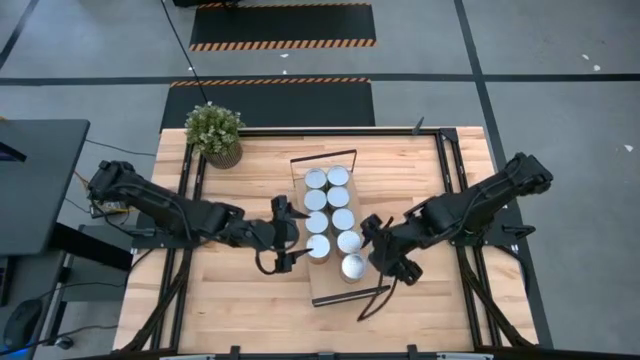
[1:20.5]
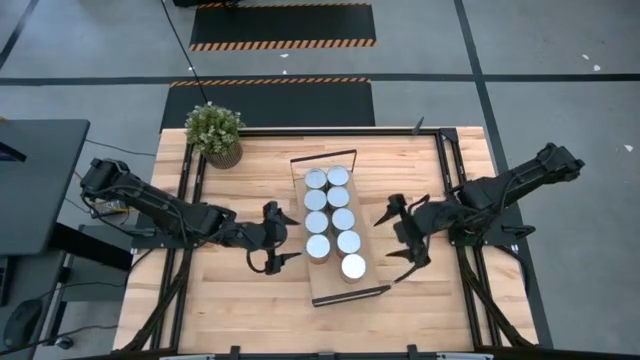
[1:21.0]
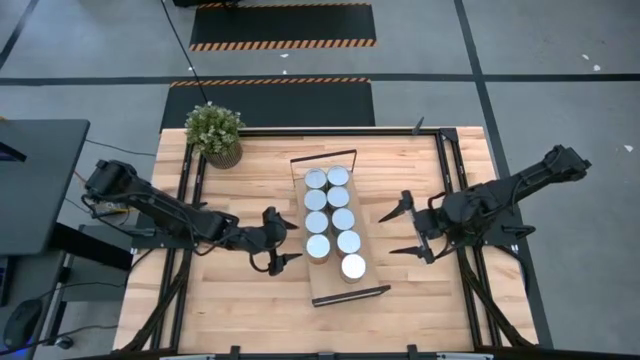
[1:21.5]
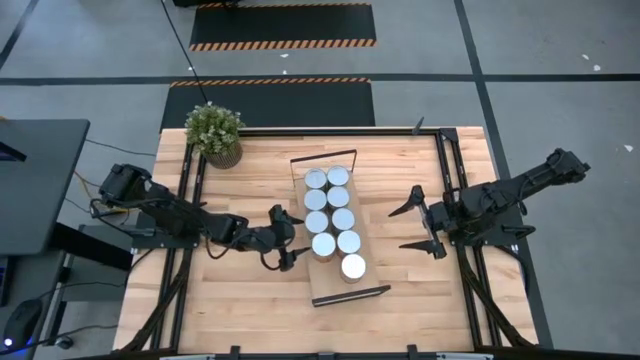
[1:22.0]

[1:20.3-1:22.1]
Task: Pick and place cans onto a shelf
Adjust left canned pineapples on the shelf

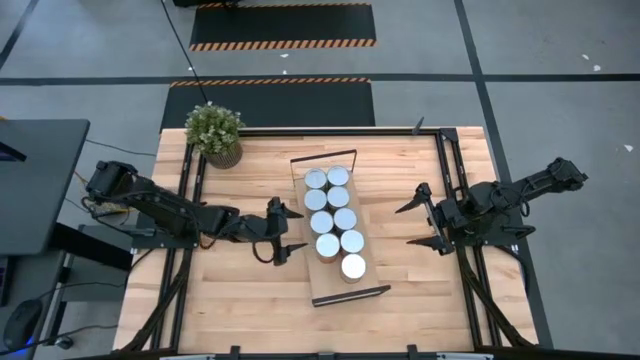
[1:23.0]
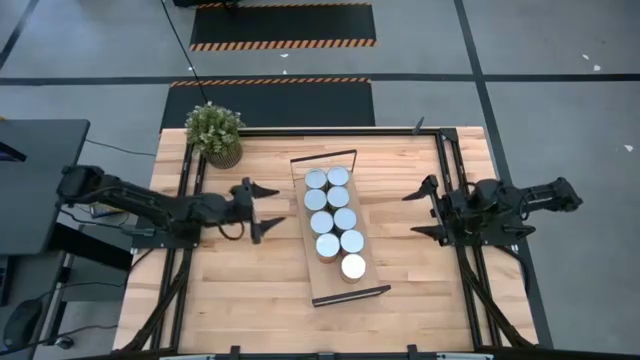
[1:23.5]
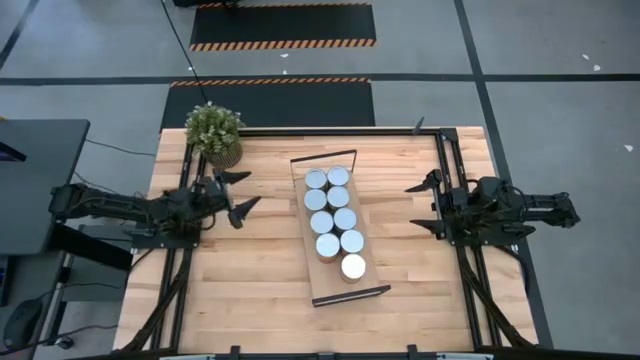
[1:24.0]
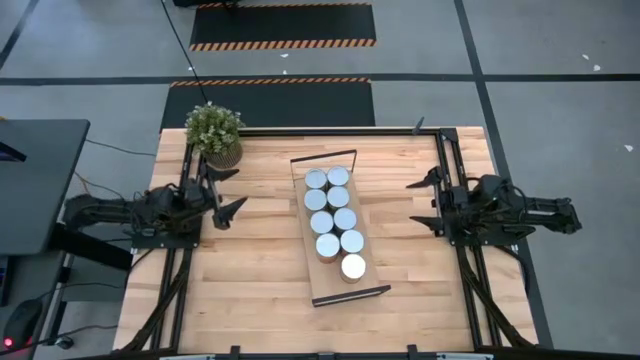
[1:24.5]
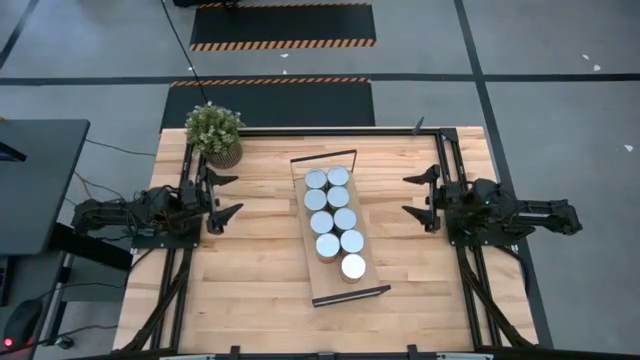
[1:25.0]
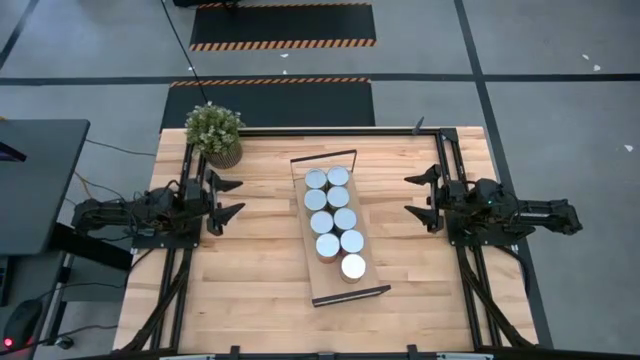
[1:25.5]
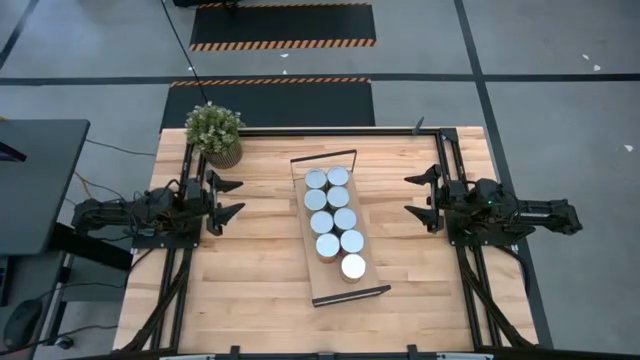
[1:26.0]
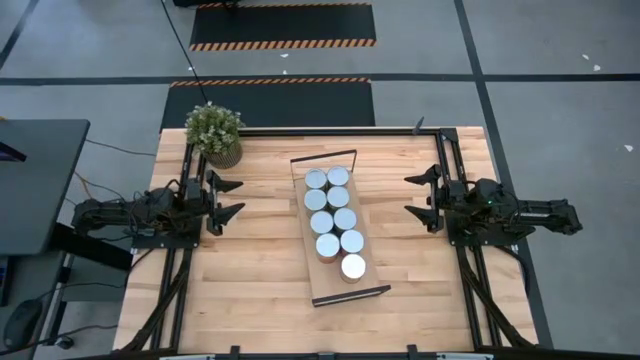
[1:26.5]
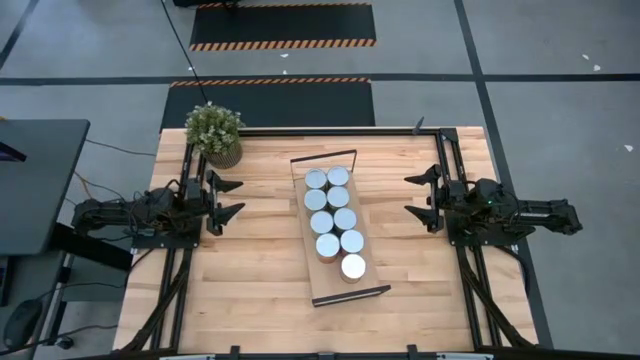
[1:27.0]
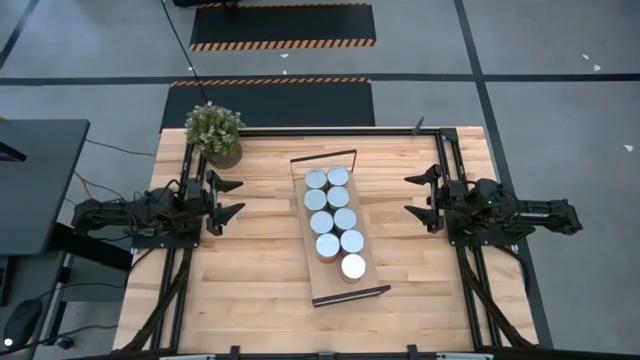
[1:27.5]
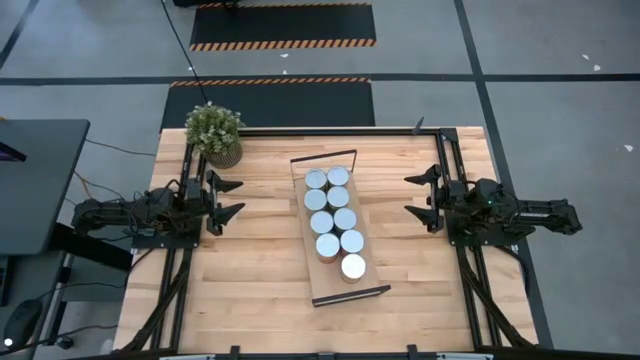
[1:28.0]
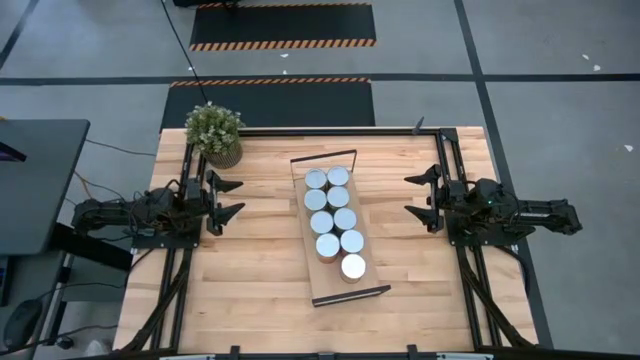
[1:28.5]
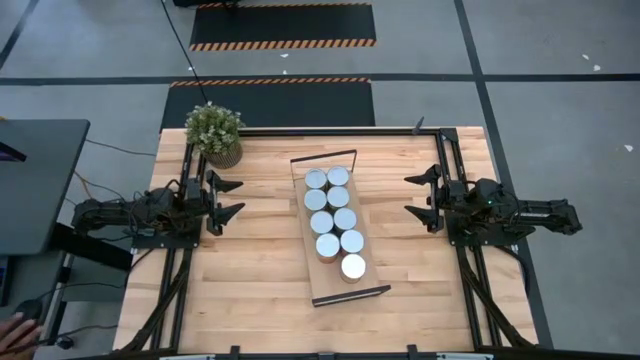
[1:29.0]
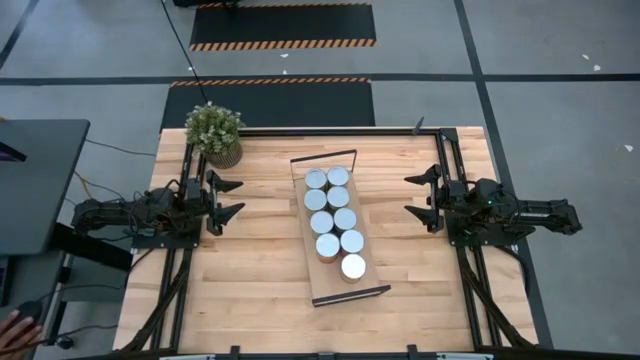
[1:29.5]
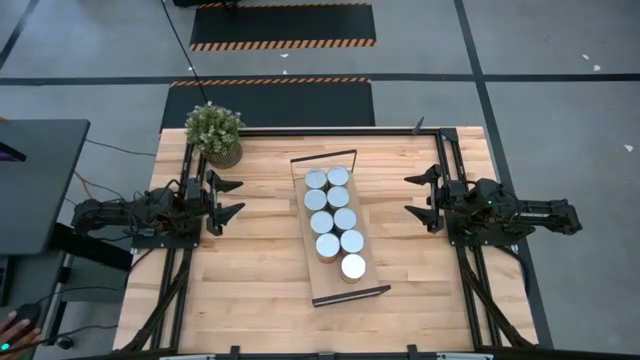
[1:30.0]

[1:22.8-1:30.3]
Return to Home Position

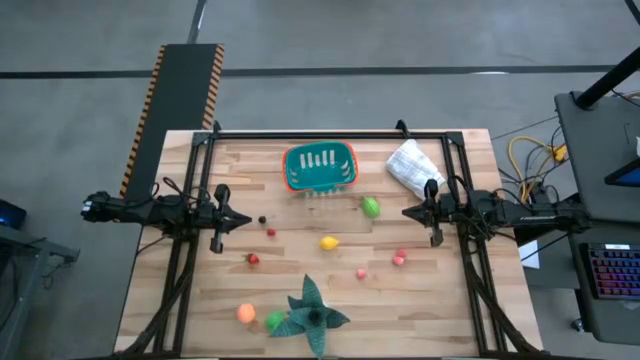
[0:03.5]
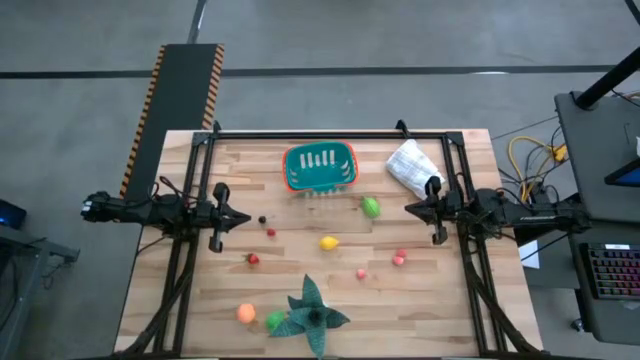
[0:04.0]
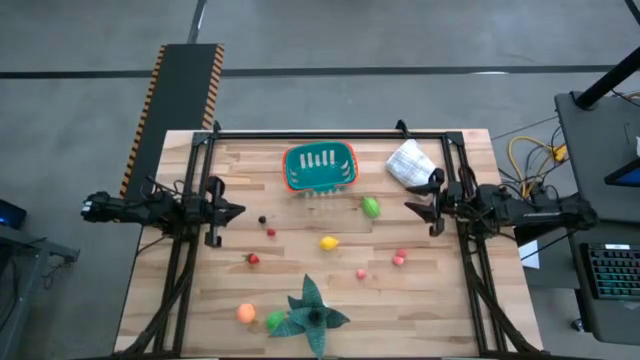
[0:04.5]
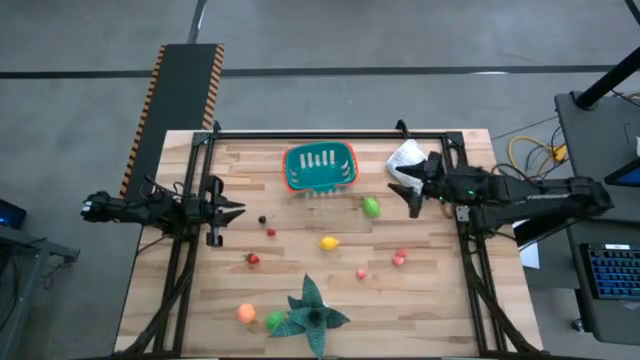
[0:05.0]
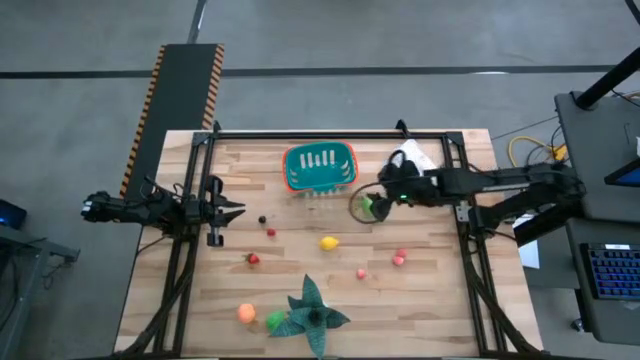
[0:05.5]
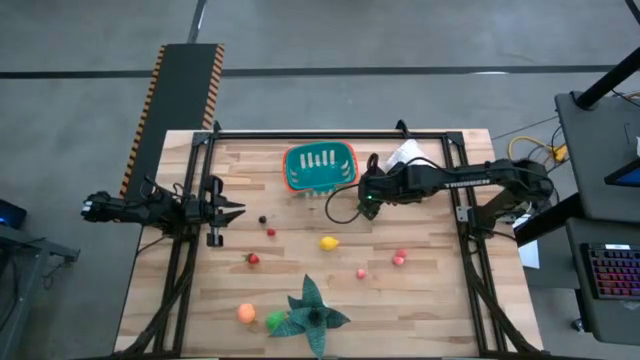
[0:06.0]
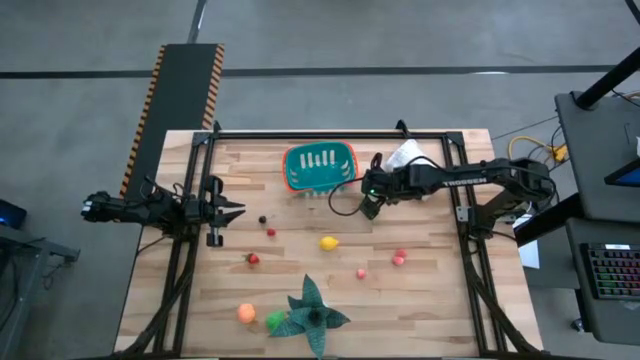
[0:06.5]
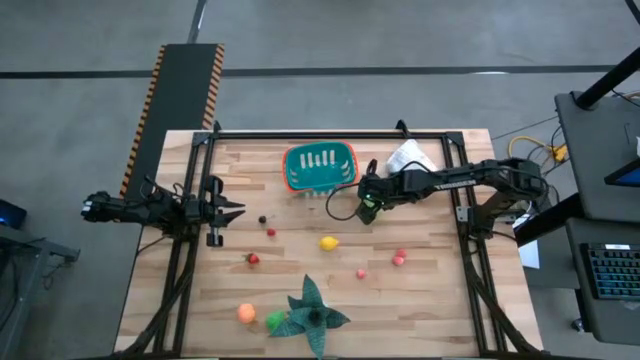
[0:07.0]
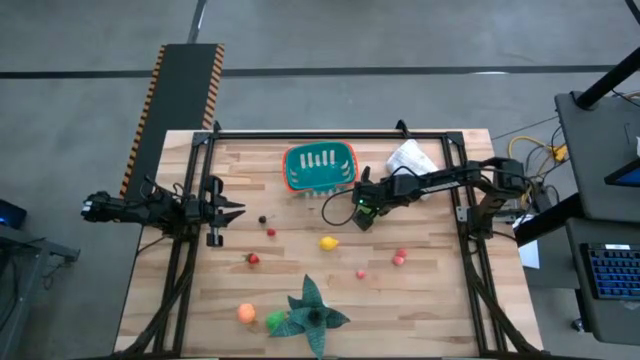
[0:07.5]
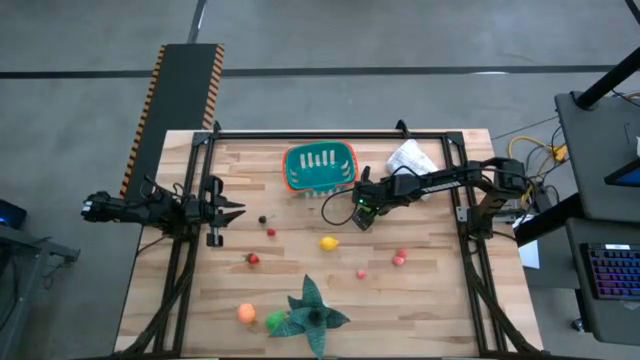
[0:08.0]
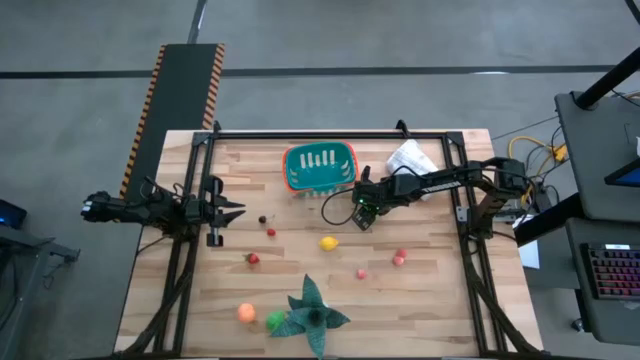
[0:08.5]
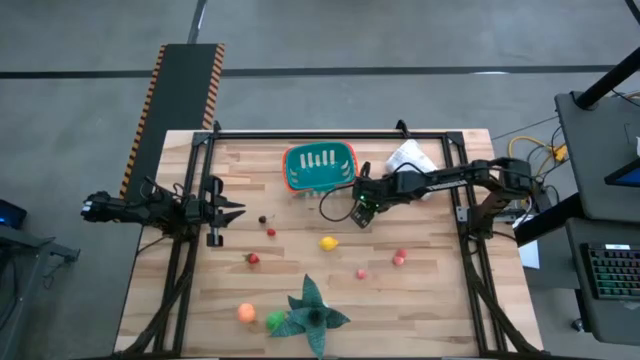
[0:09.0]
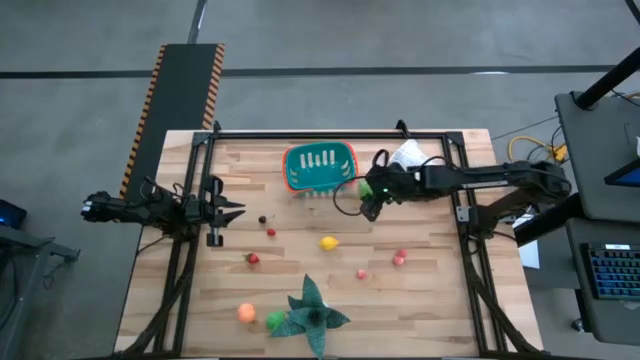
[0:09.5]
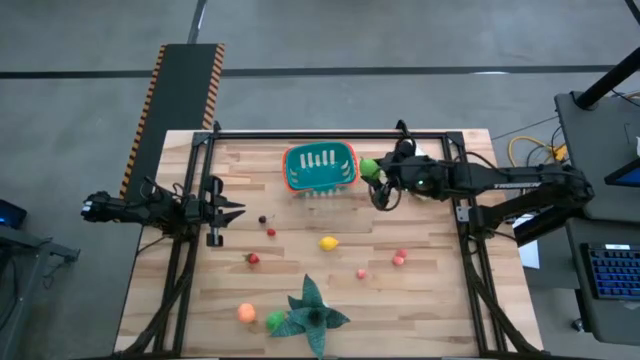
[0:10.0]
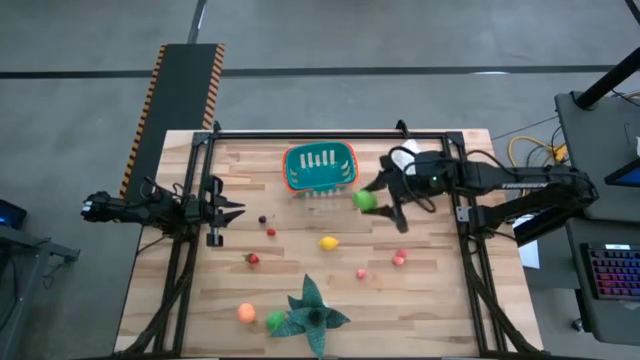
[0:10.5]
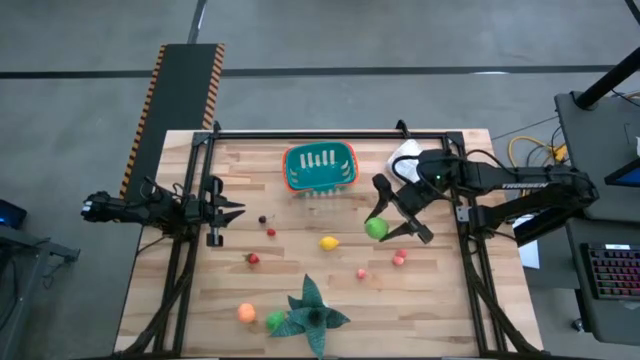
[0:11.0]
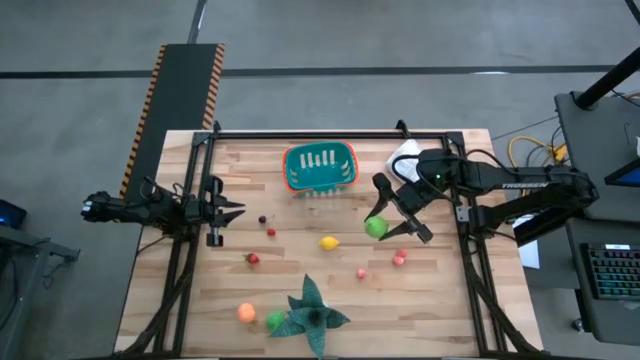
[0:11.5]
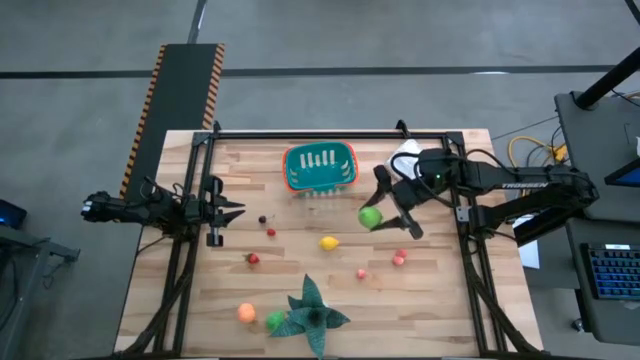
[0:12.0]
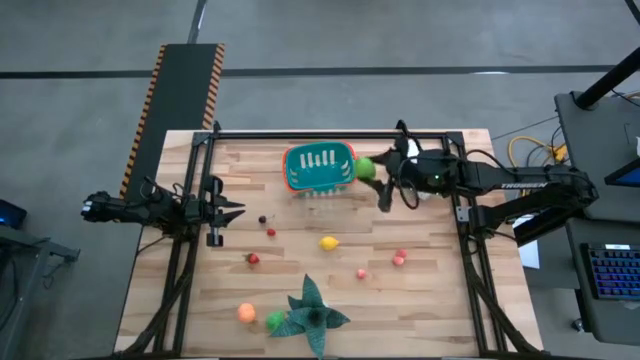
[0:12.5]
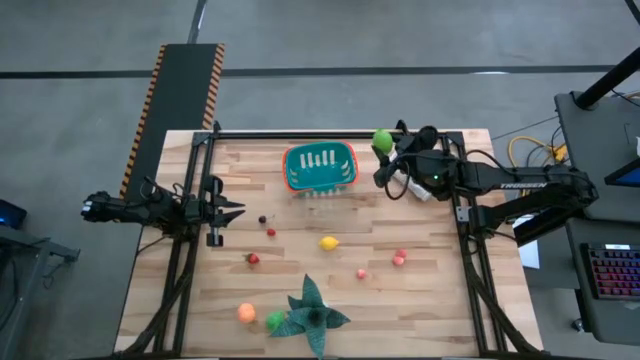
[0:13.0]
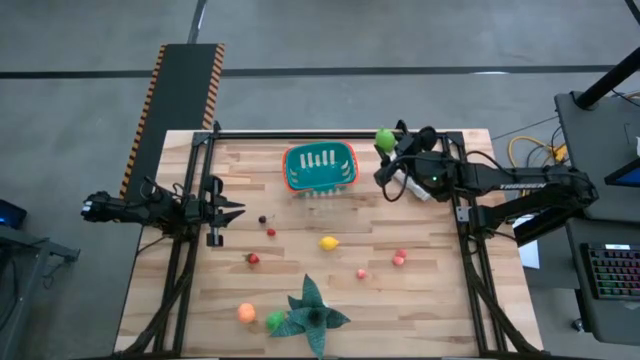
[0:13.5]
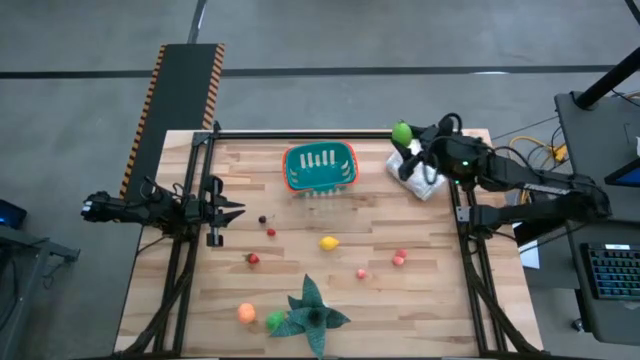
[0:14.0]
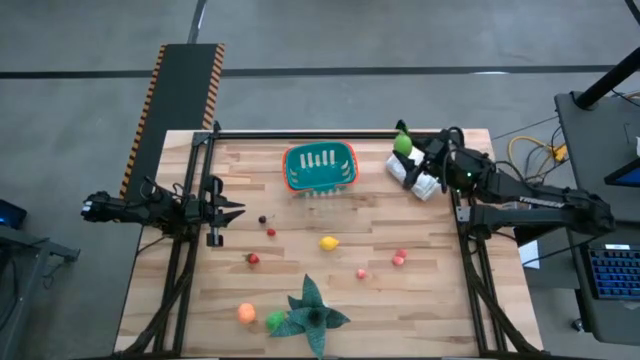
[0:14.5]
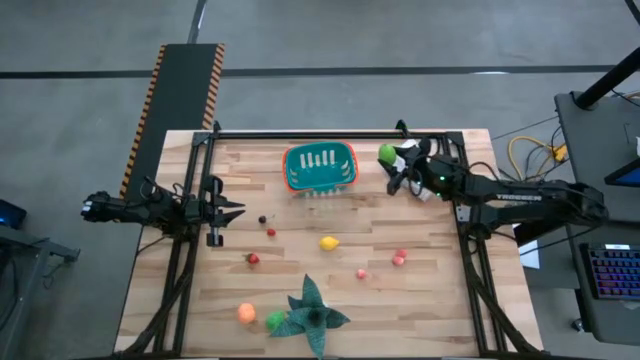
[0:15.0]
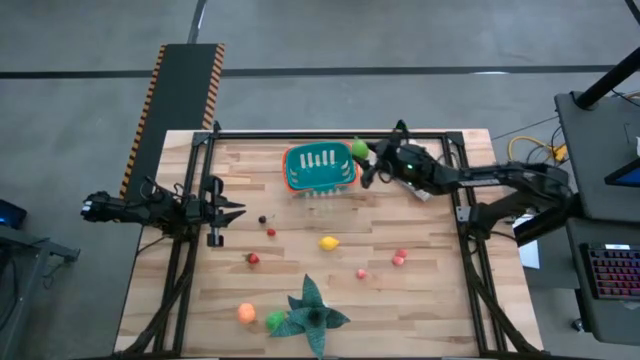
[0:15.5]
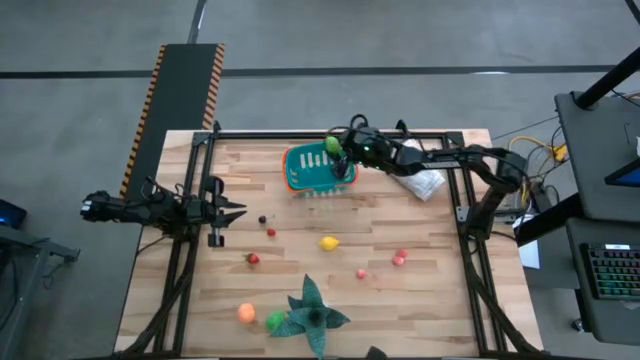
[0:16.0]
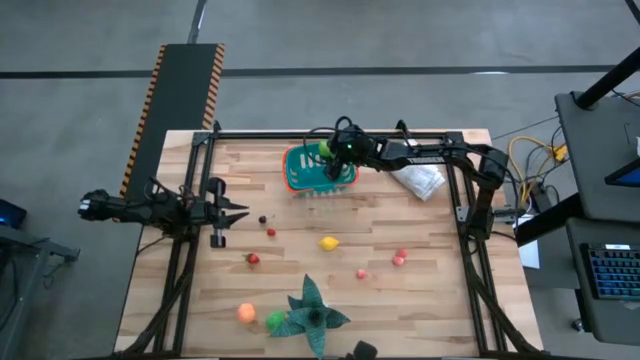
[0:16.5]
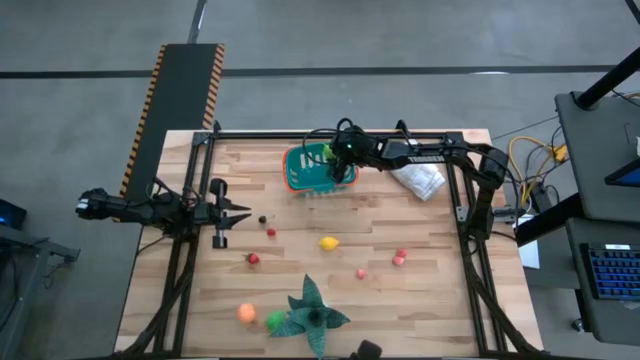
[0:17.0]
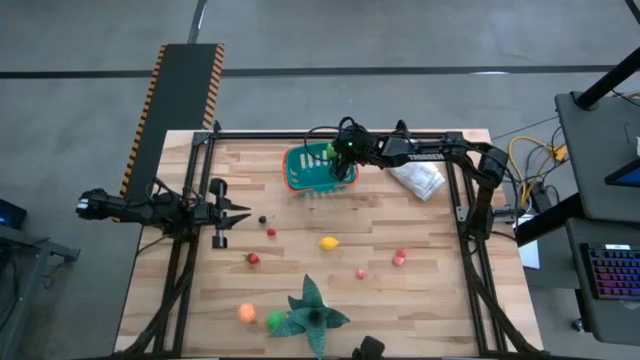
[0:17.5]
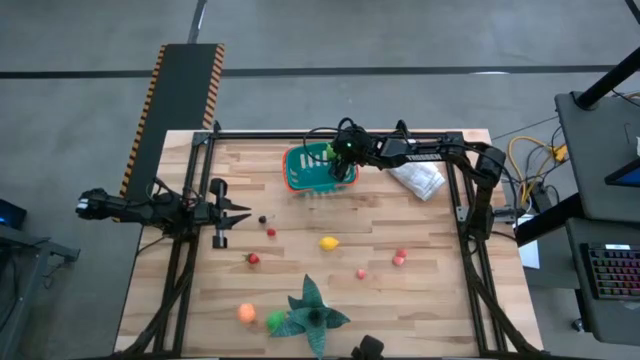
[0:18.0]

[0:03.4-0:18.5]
Task: Pick and placing Produce into tupperware
Put the green cantaloupe toy into the bin
